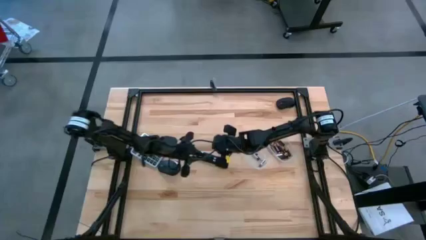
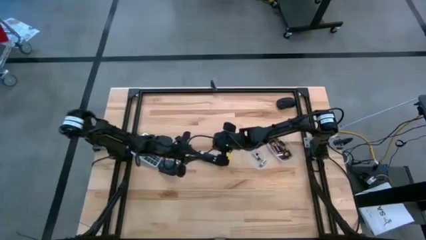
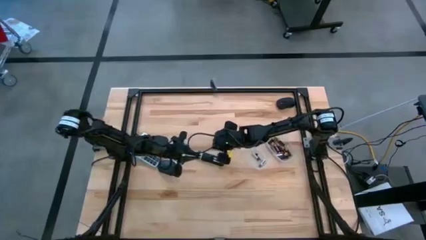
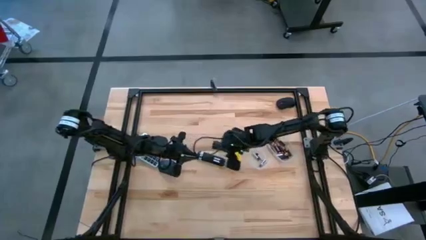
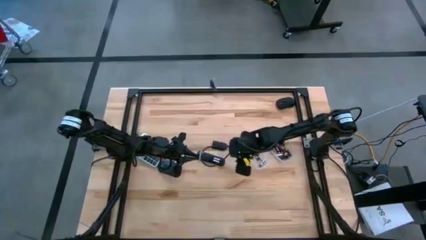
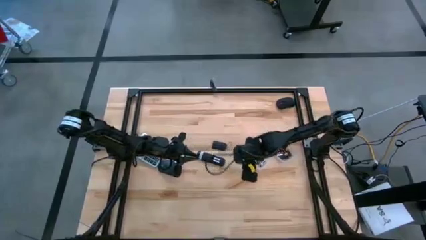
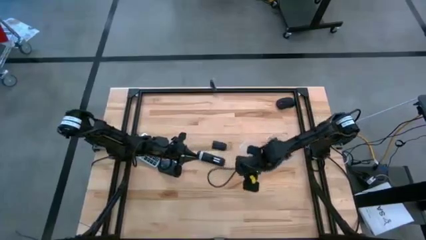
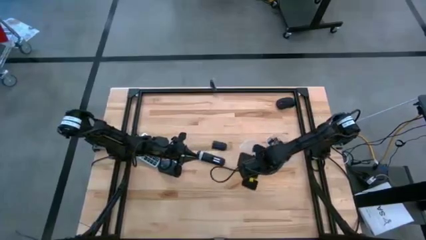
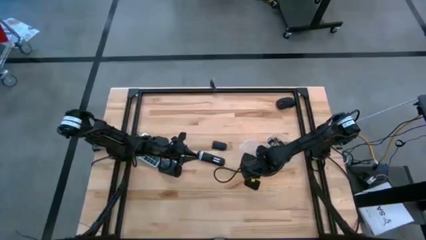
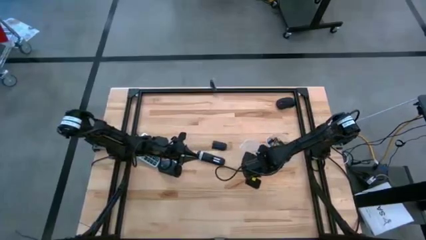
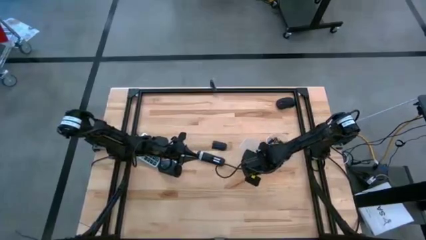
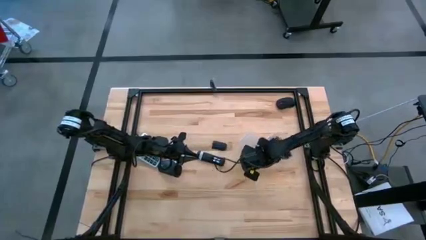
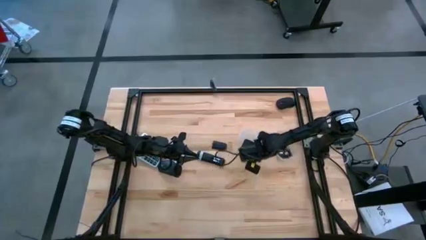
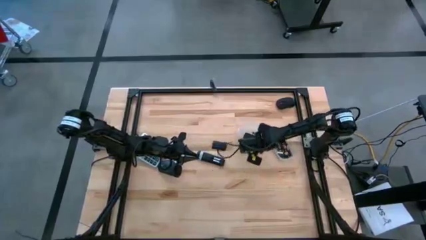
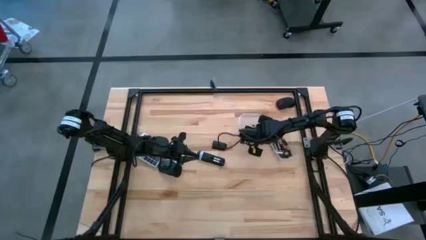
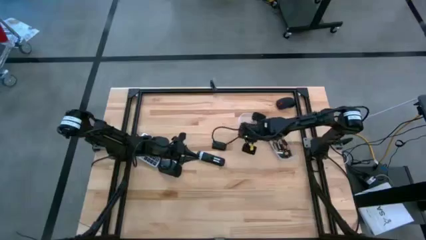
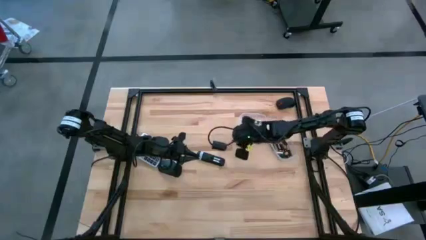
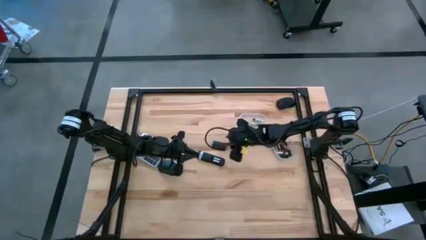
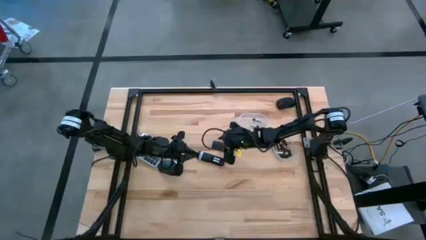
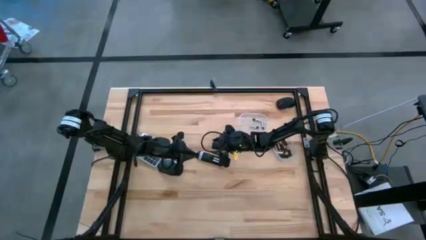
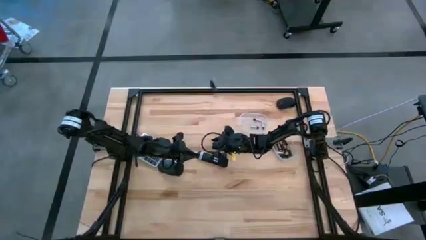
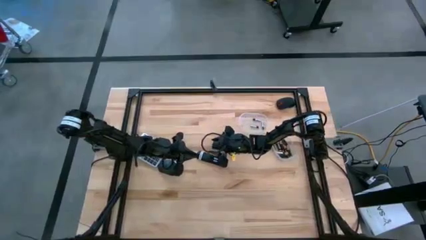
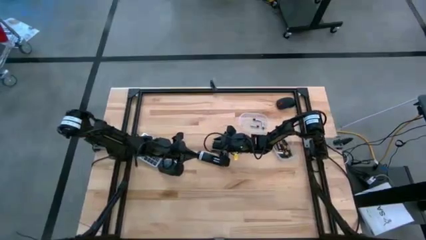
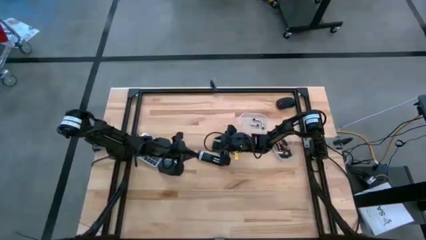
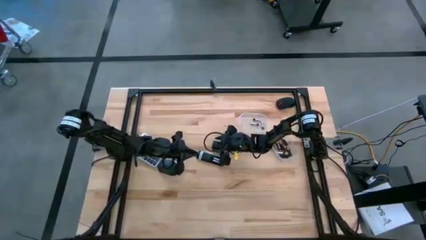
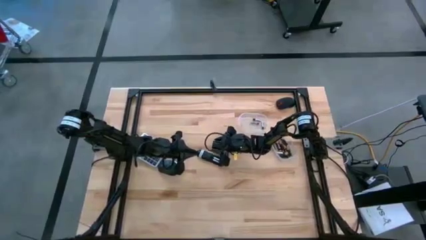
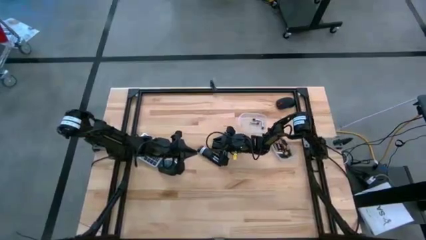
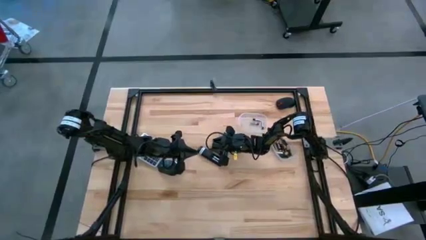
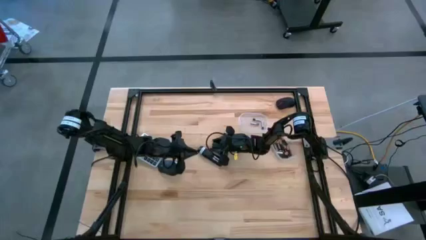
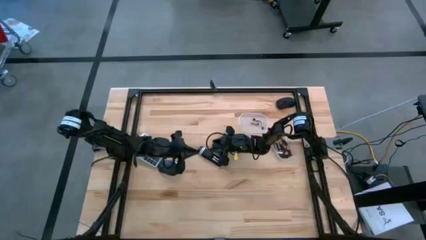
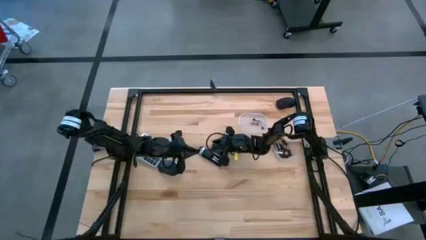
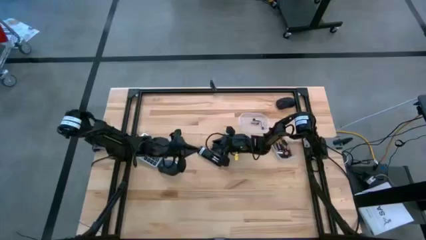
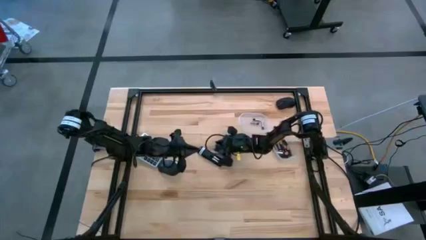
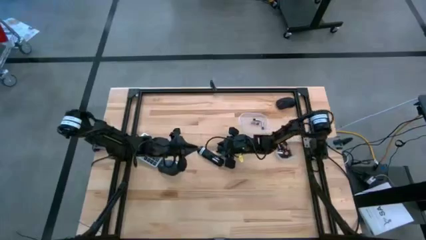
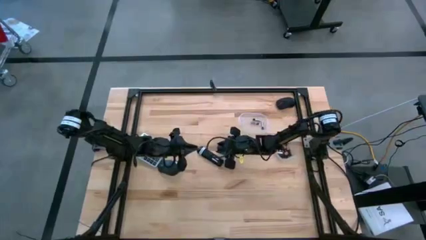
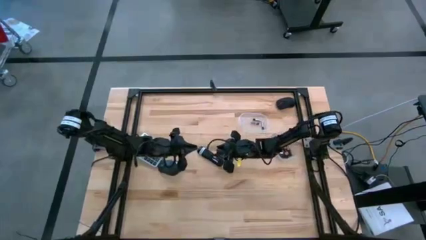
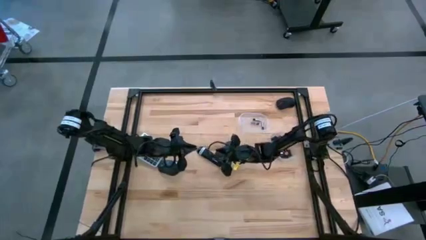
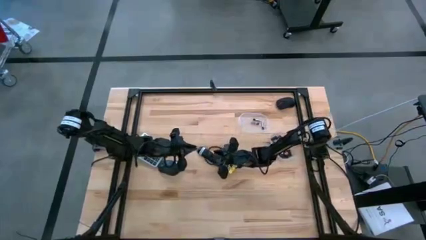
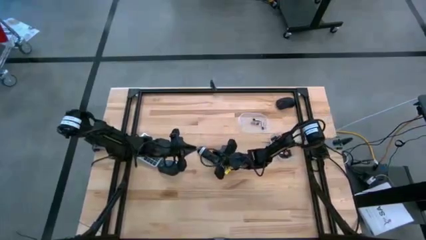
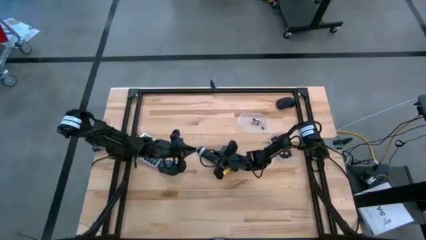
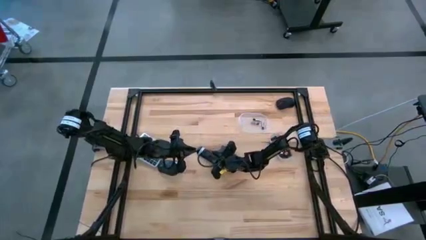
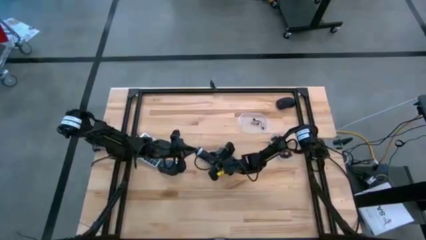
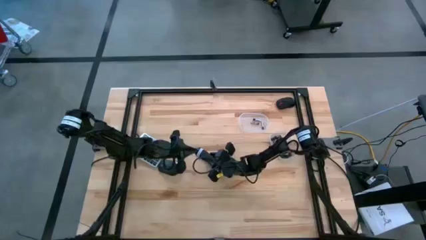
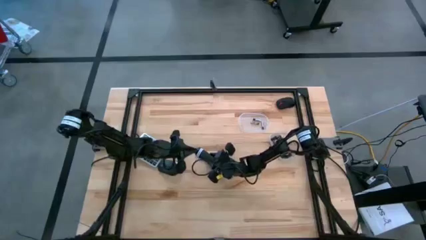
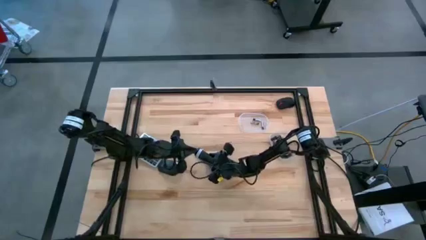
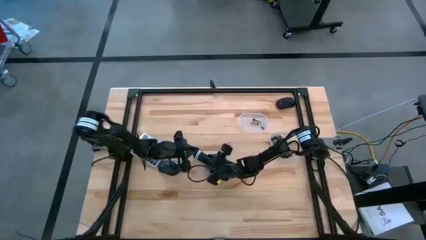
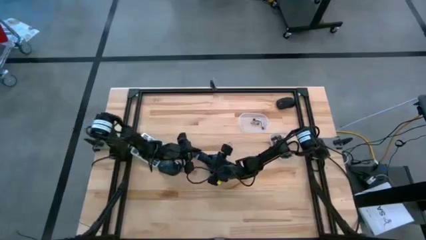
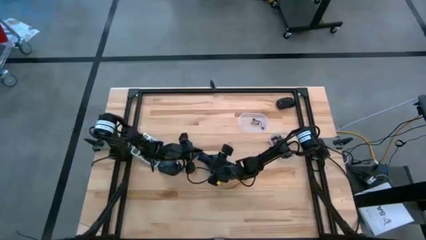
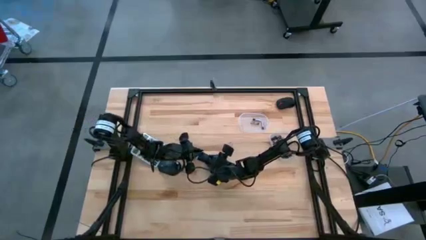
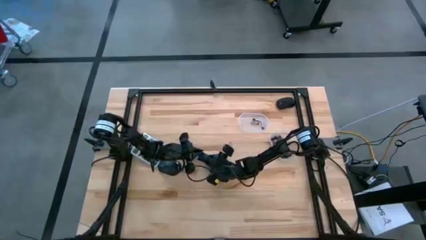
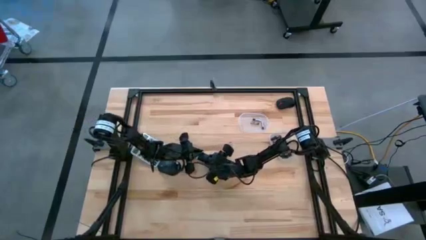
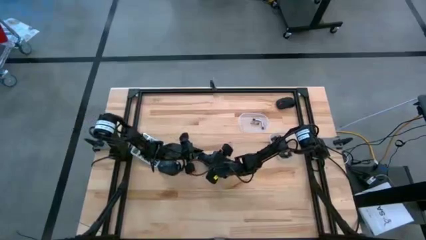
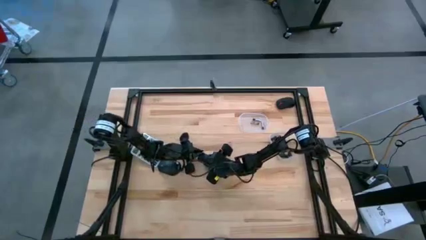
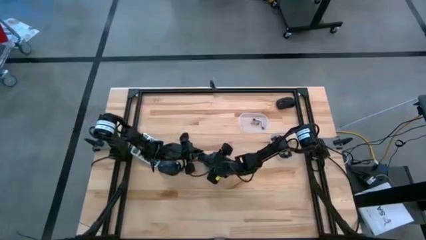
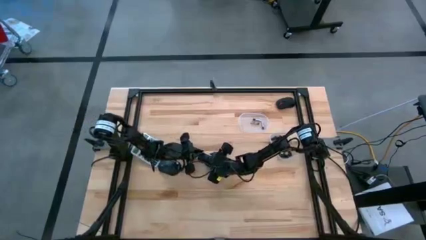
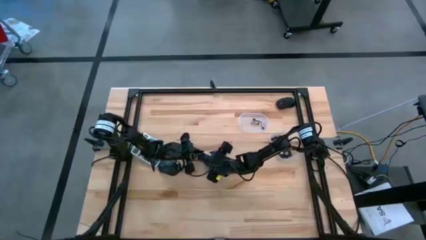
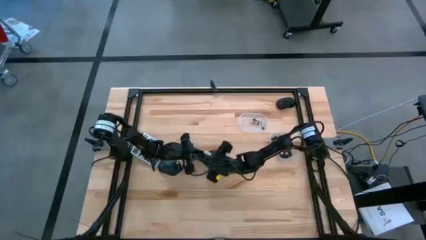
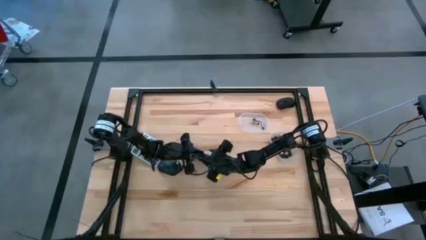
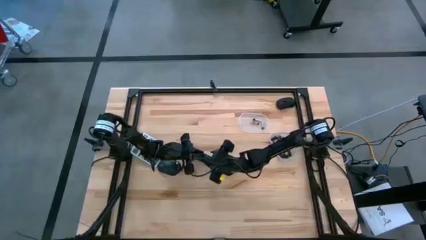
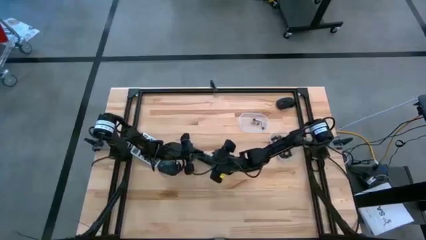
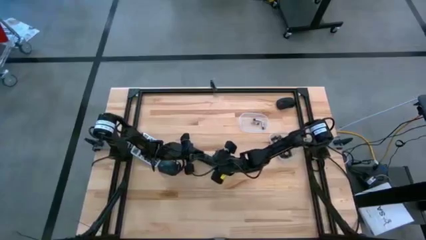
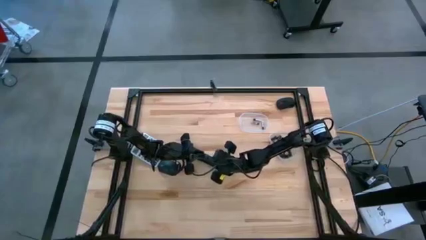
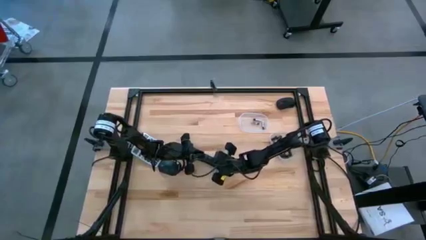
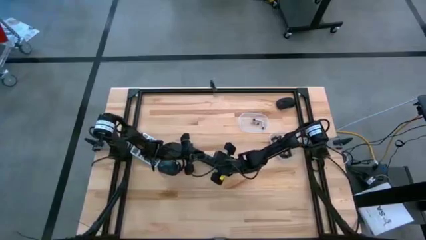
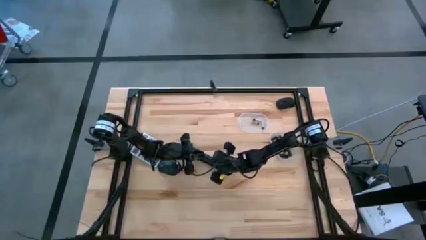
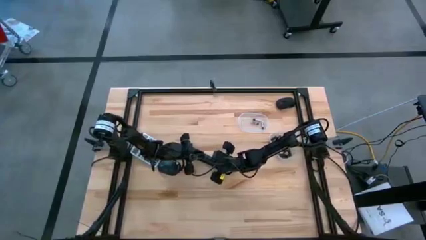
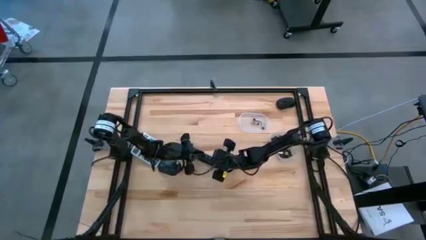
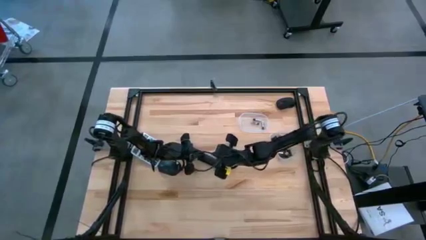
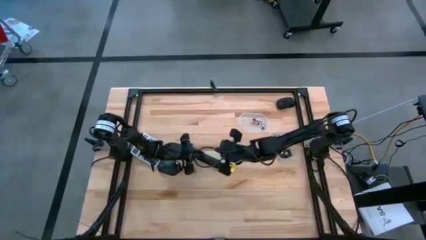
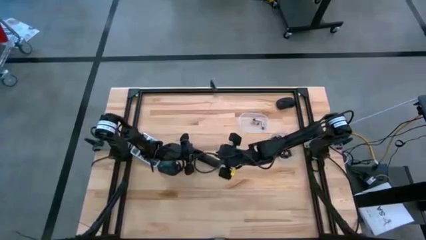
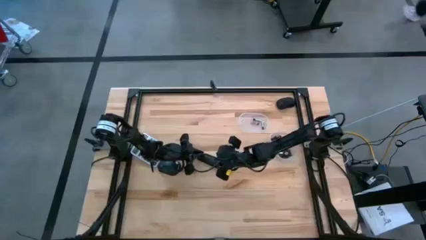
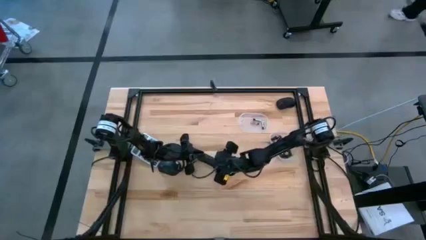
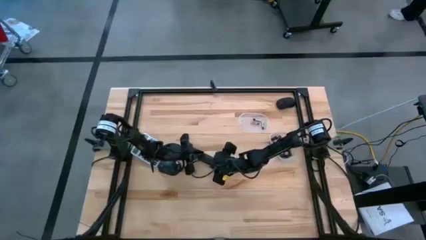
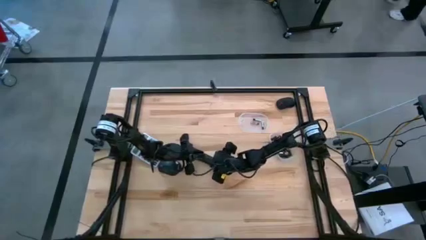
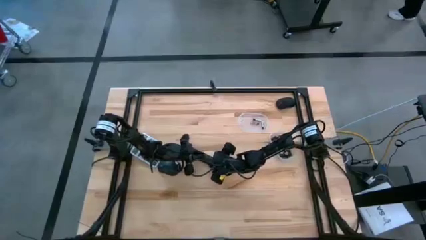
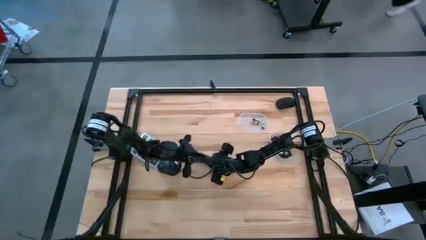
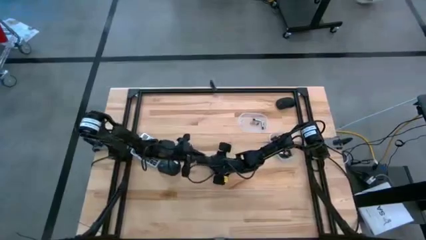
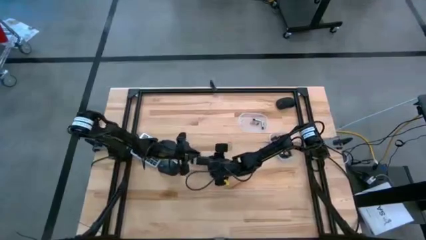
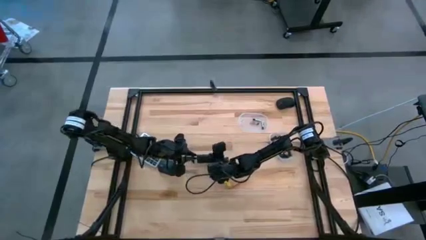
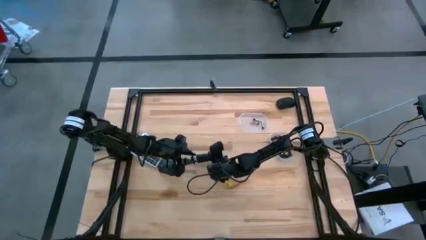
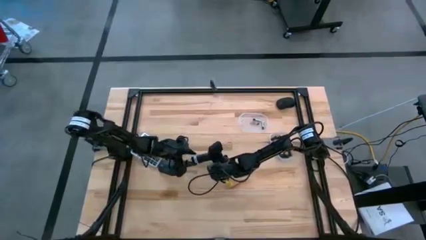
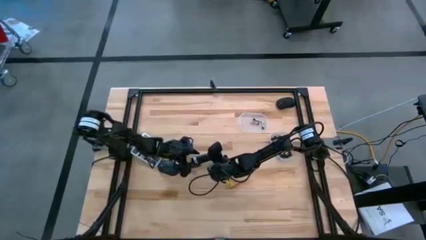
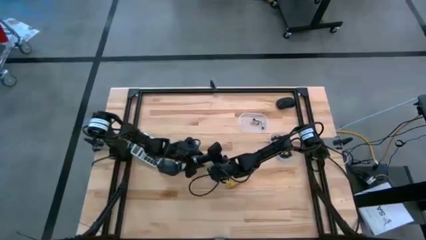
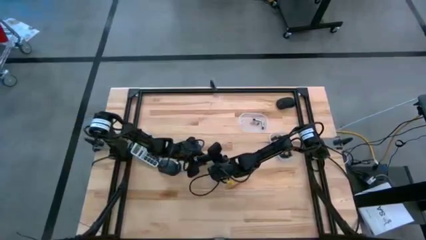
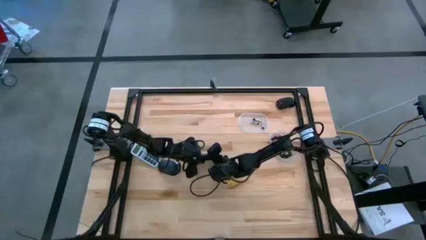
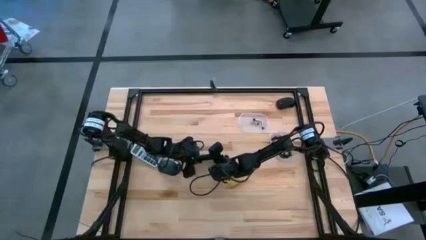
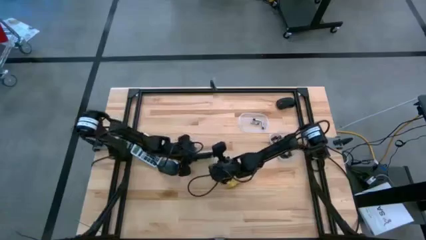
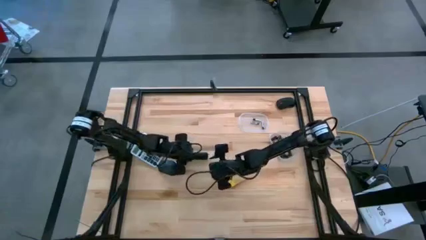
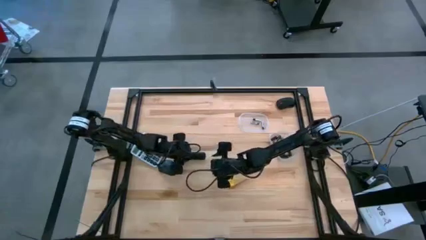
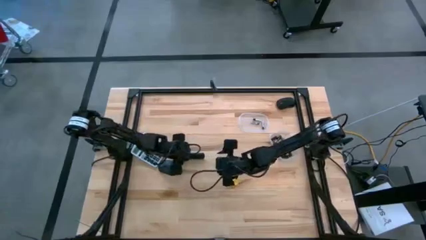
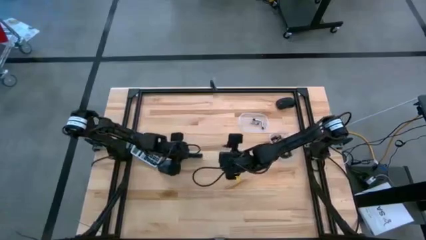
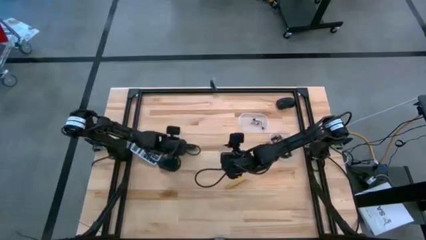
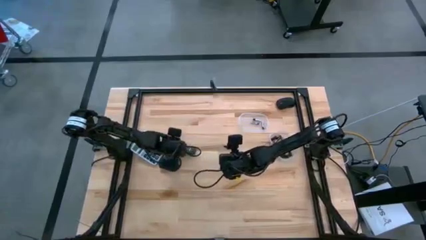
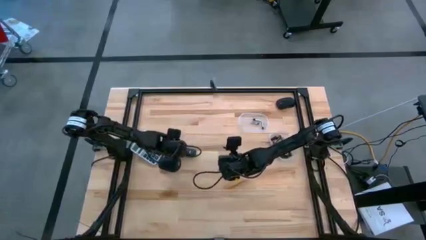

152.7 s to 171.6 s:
Task: Insert battery
Close the remote battery compartment
